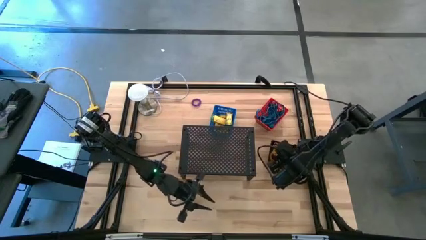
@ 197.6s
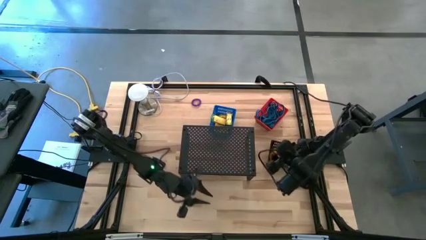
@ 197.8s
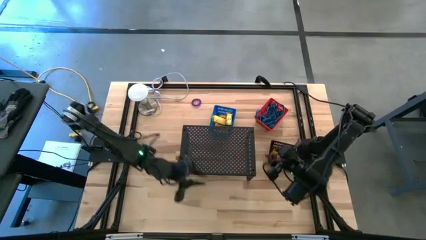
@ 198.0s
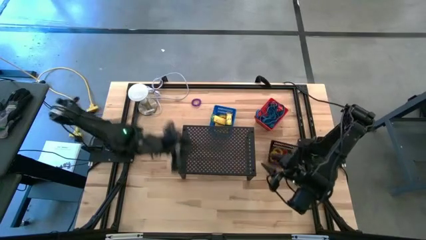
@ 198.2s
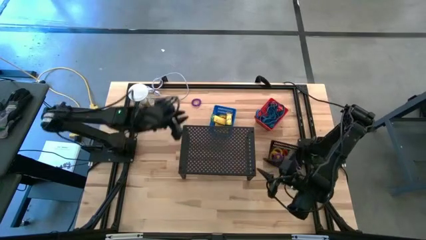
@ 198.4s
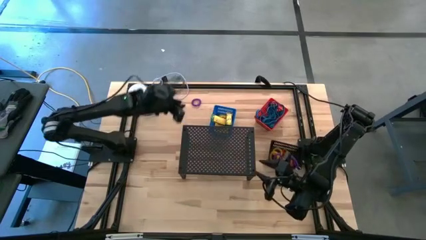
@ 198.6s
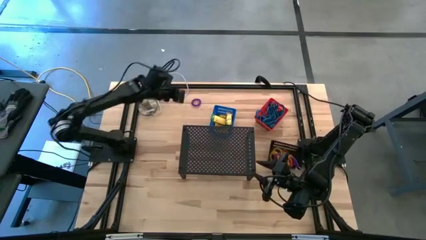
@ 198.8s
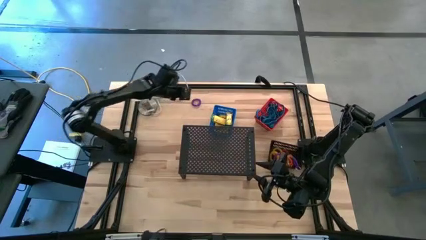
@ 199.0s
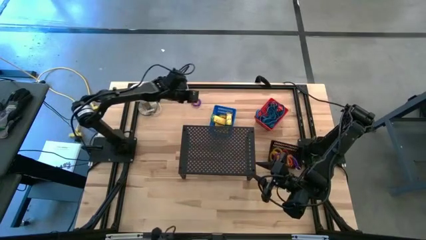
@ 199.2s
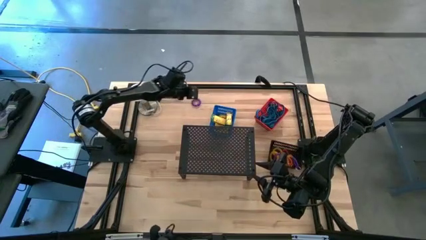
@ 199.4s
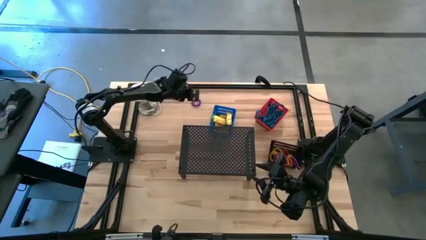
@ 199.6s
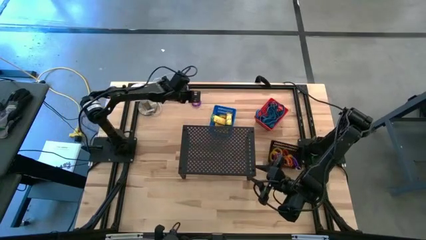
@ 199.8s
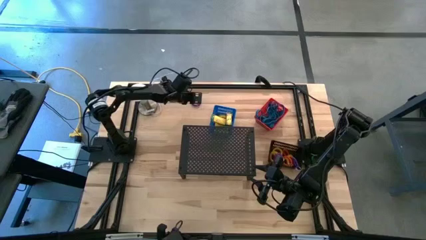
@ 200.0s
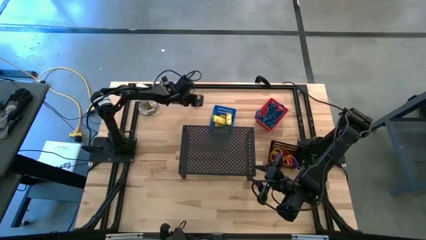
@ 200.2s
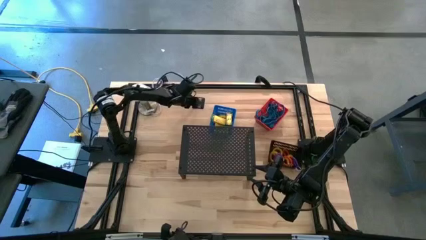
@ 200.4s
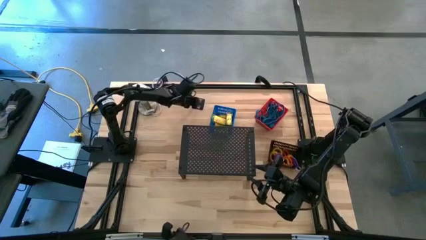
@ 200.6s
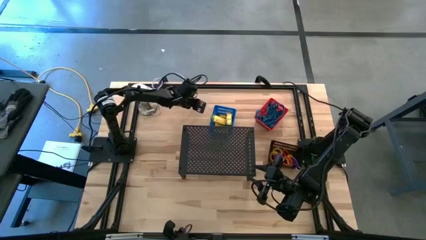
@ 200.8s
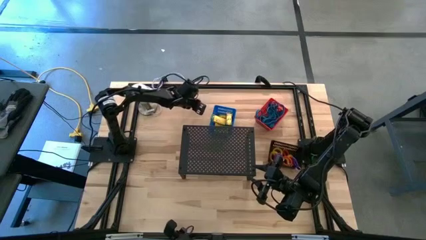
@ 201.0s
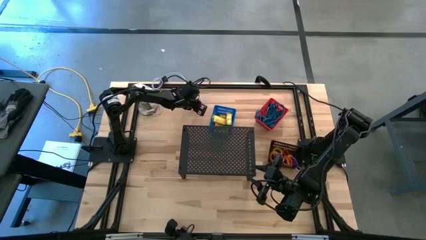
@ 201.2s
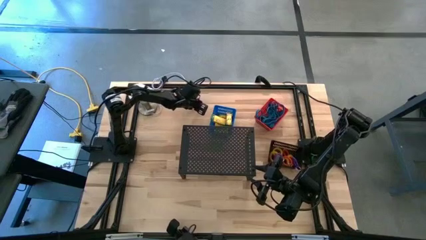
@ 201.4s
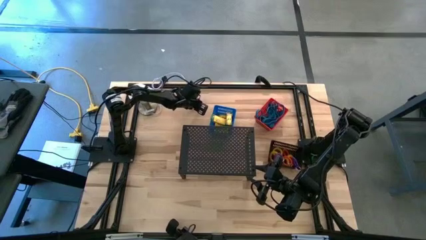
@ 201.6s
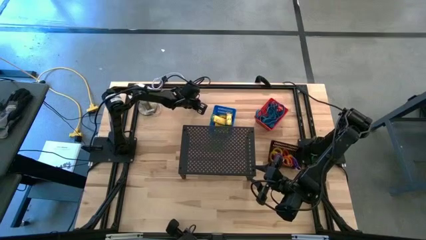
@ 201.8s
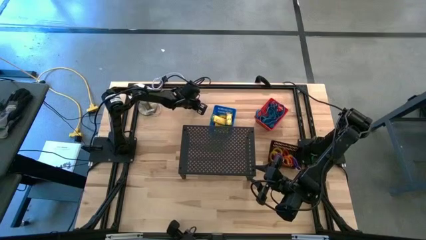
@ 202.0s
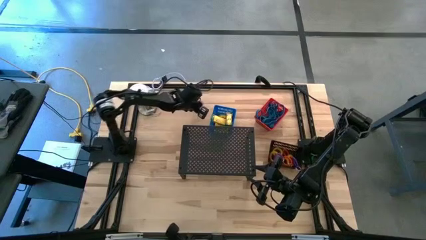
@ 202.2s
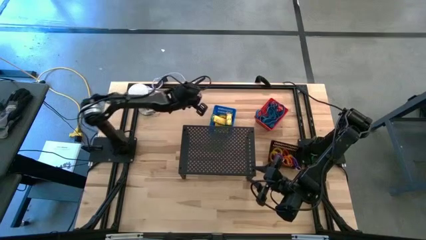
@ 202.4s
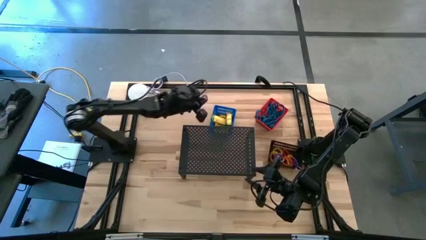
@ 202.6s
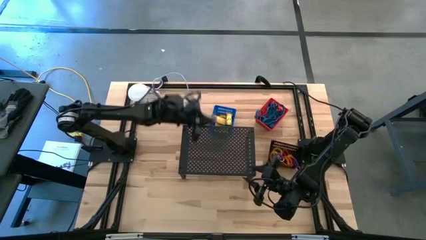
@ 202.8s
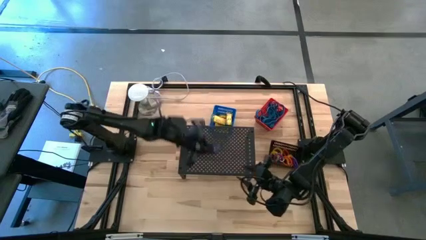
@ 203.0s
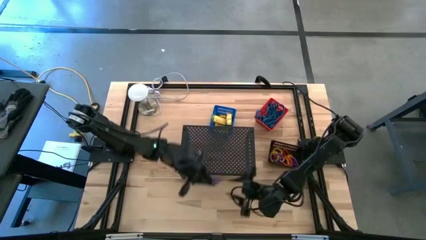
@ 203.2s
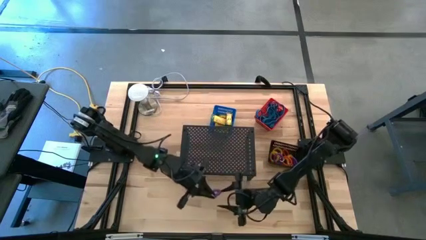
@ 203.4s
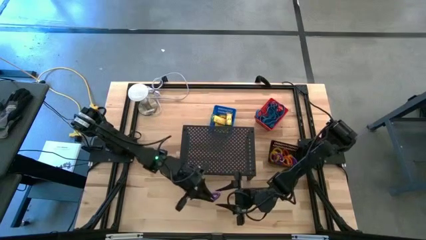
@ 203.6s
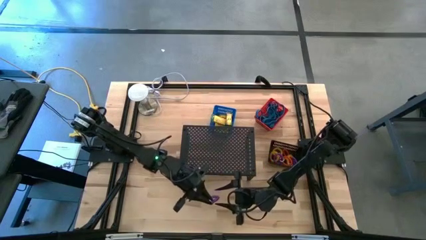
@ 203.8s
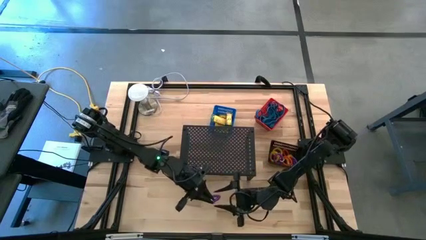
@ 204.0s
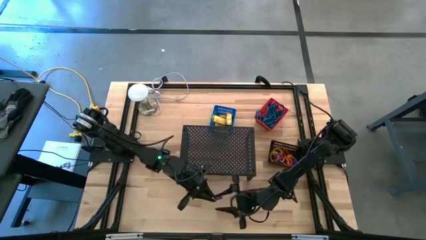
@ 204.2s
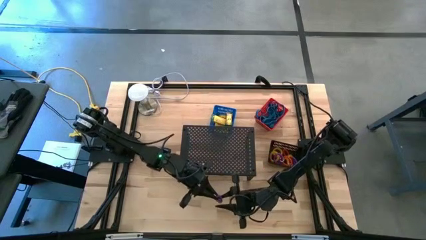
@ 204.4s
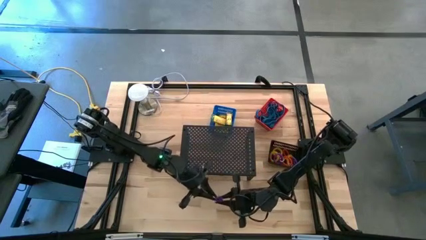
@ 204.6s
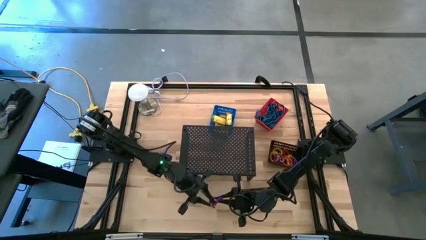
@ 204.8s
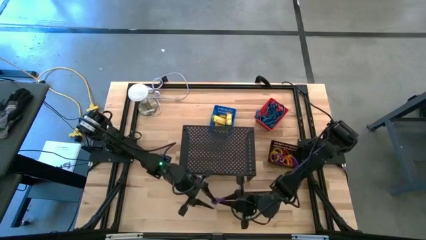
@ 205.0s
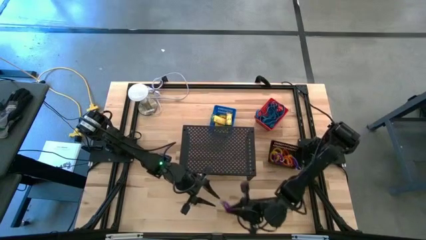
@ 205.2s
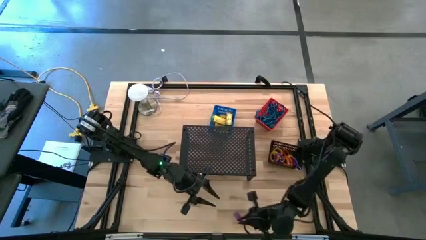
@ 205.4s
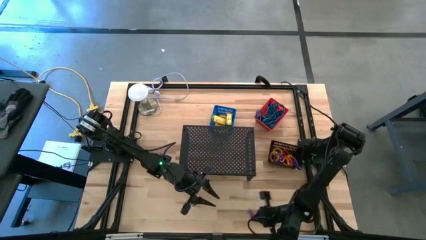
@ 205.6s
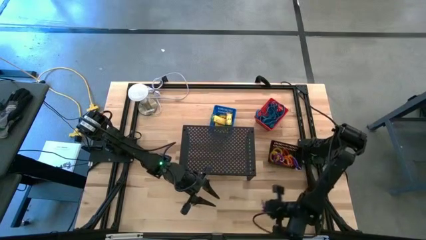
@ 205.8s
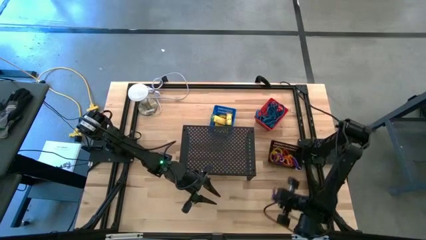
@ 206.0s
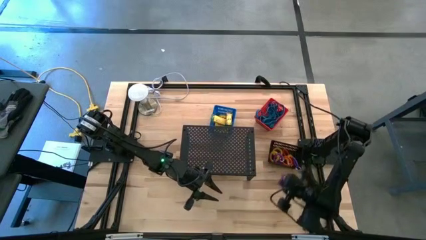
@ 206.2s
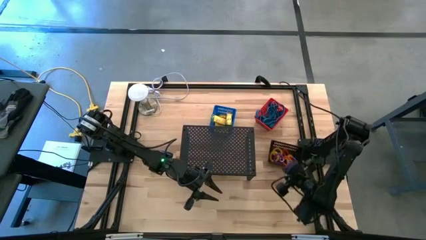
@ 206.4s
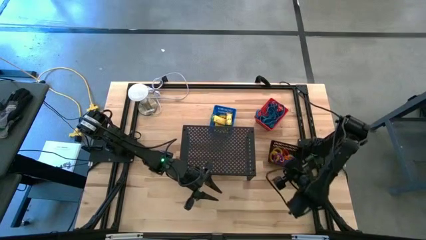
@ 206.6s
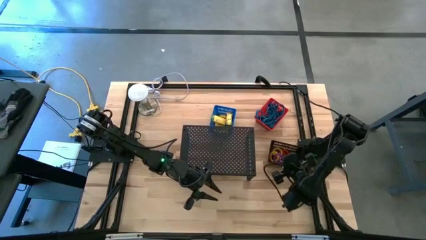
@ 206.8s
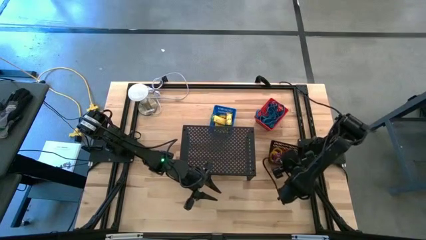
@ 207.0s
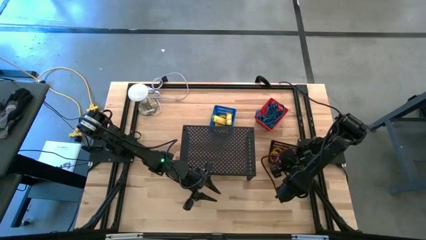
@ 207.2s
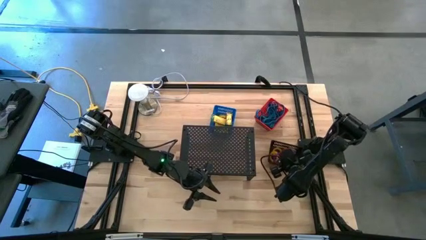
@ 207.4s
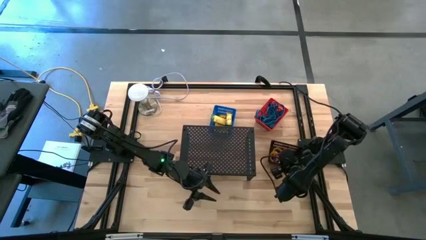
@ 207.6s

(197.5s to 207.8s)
Task: Pick & Place Office Desk Supplies
Put the purple spiral keychain into the black bin

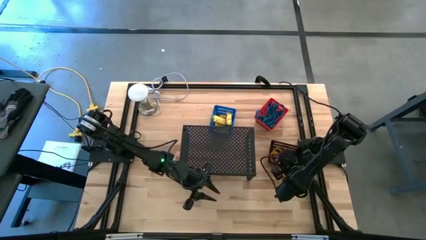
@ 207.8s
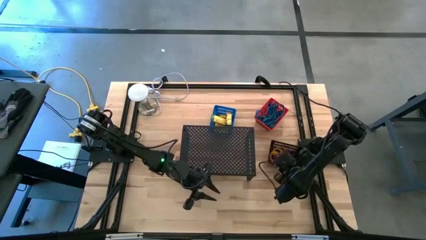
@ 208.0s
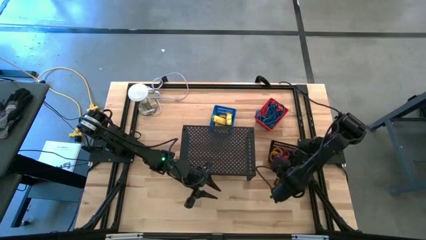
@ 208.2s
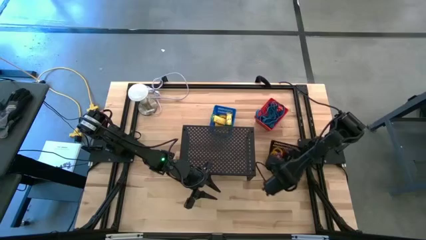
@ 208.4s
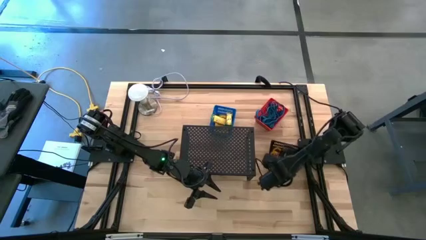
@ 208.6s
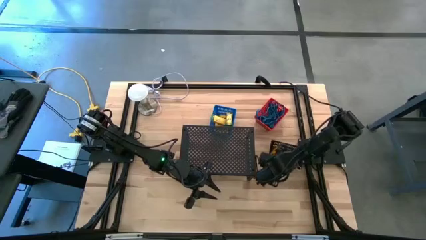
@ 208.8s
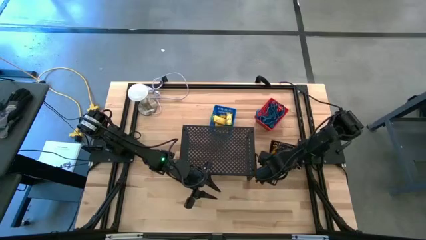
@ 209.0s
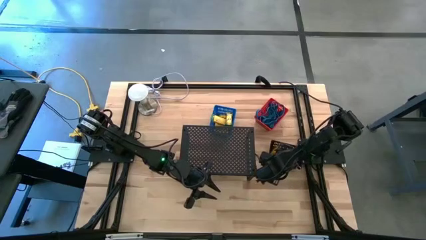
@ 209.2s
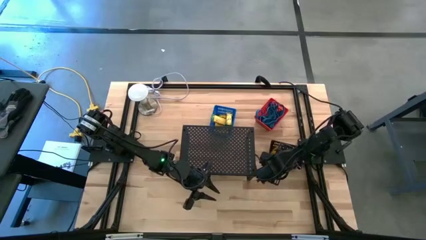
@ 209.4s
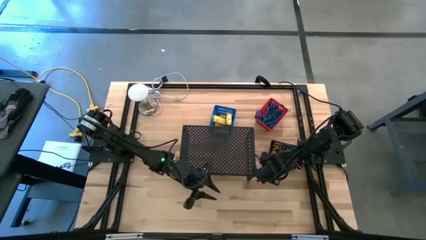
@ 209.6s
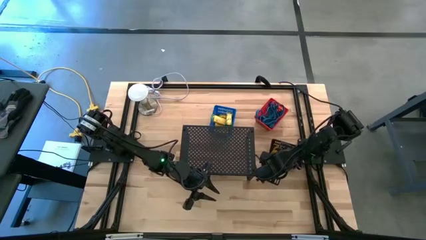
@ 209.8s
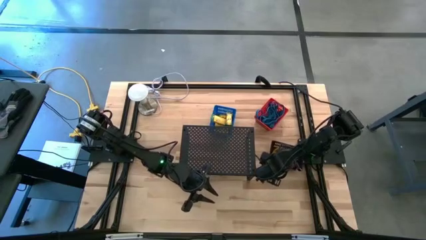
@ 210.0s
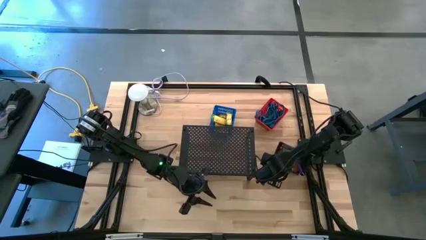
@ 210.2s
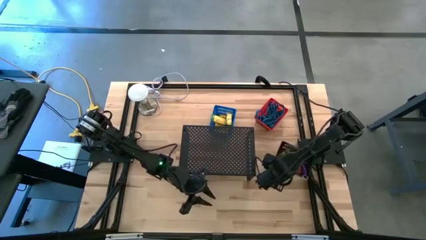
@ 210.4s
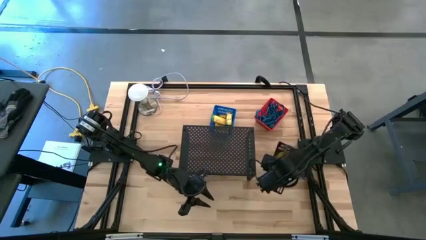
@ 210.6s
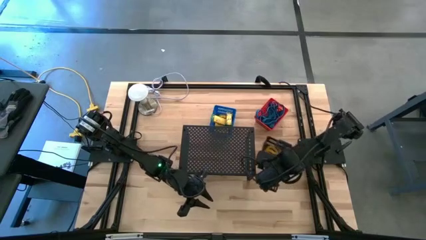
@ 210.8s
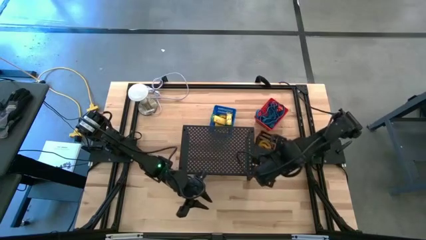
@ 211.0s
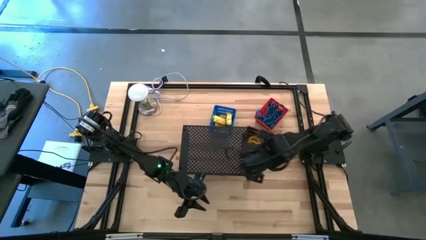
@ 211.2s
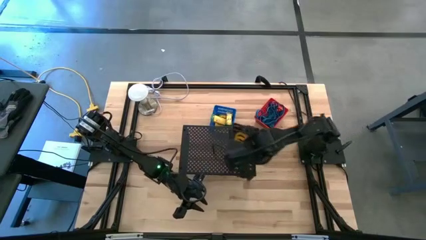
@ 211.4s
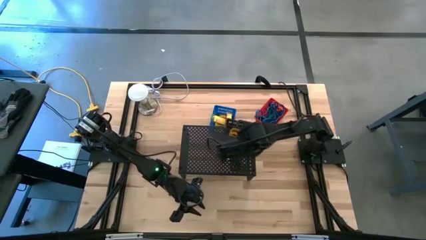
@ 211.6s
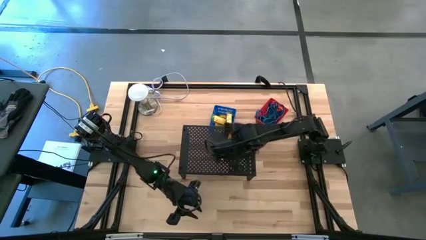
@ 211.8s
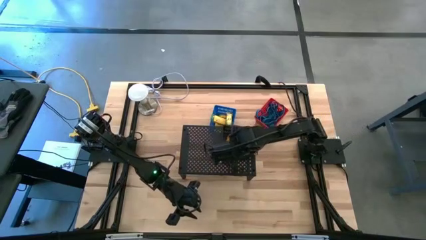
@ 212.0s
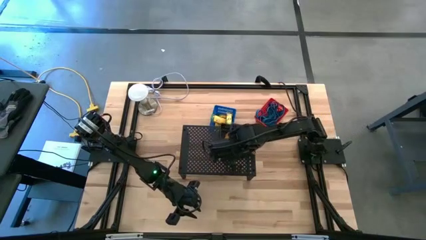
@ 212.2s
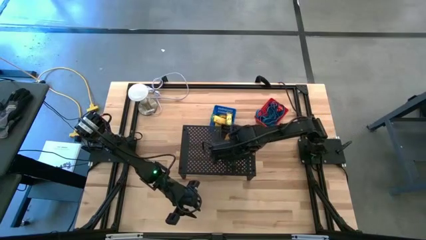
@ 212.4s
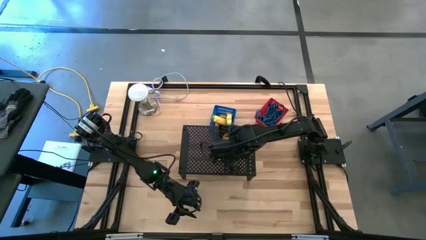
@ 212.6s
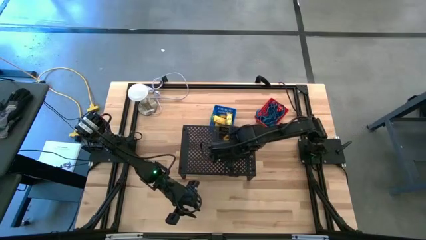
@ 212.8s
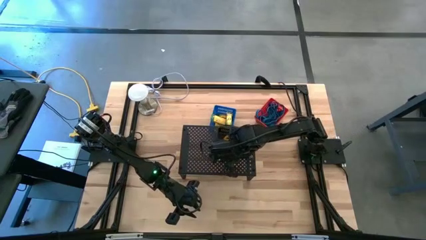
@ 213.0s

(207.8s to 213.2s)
Put the black bin on the shelf
